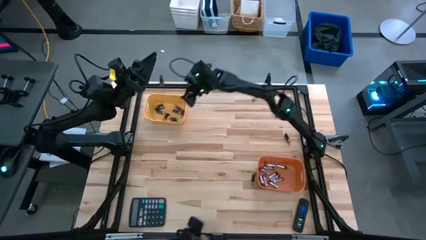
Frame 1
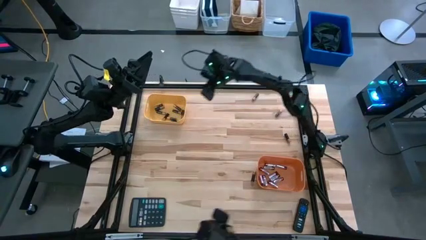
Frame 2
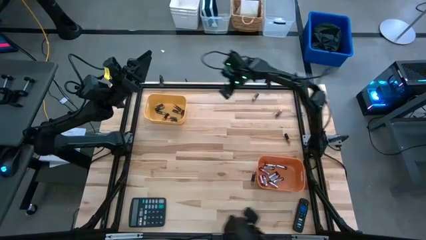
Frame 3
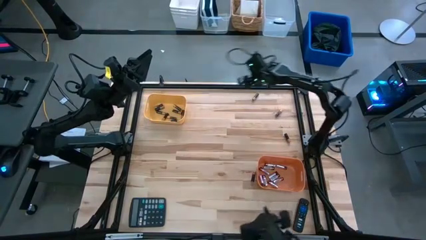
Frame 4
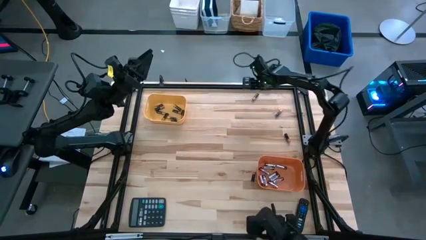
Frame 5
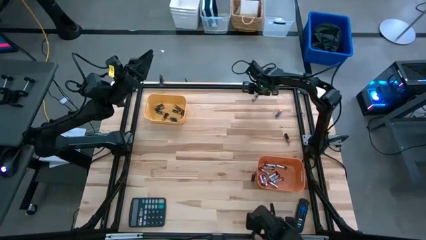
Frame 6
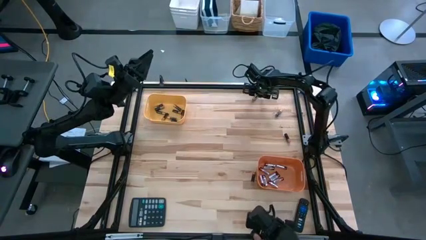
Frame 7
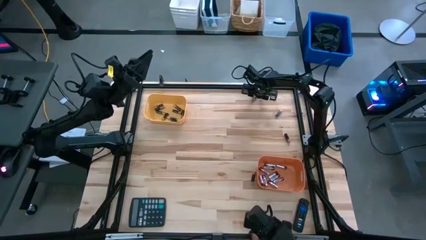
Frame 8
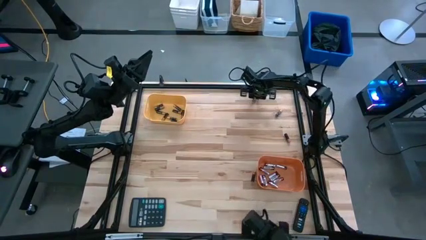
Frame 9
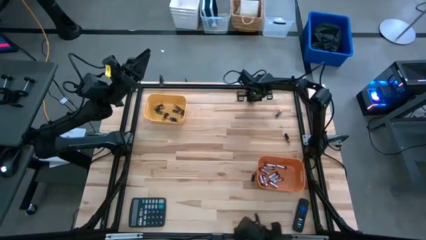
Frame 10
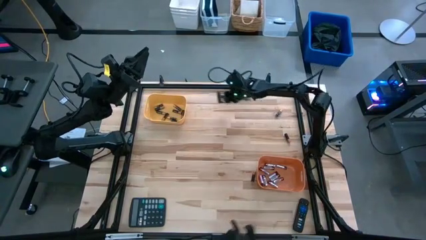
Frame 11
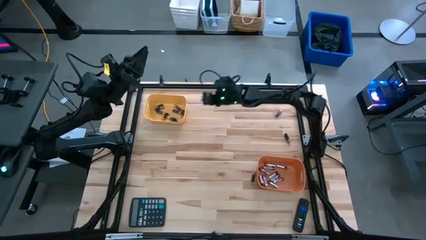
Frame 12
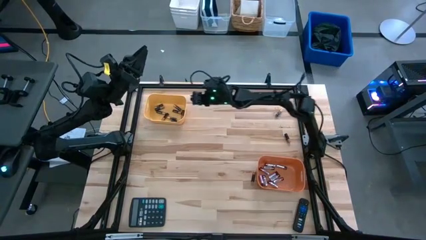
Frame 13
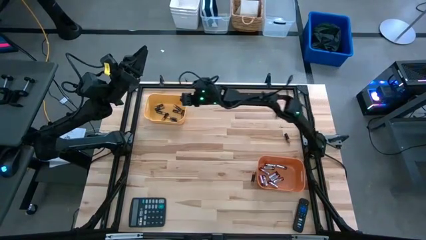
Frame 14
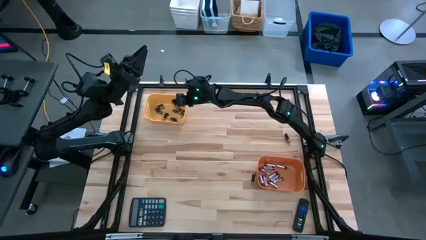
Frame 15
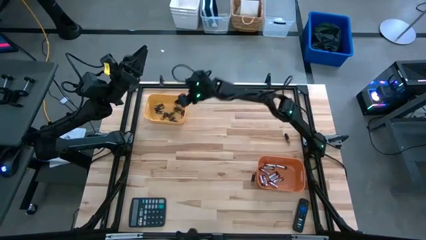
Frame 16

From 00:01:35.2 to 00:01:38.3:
Task: Sort batteries
Put the black battery into the yellow bin

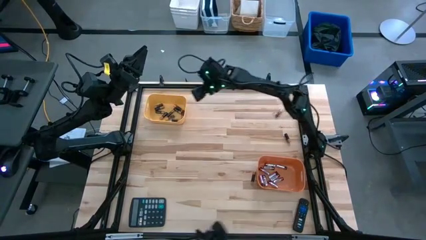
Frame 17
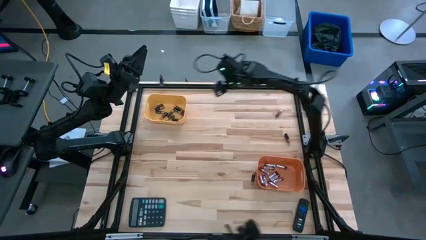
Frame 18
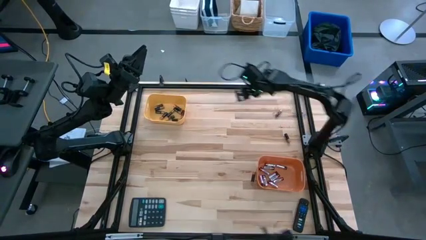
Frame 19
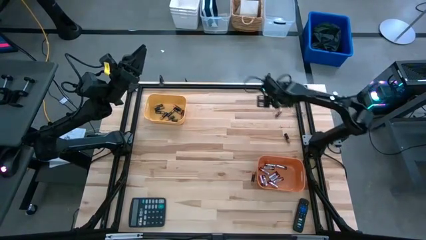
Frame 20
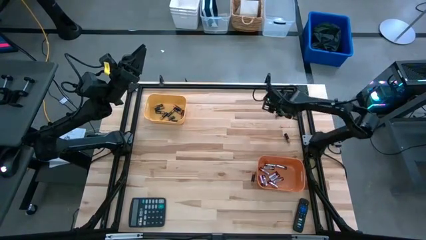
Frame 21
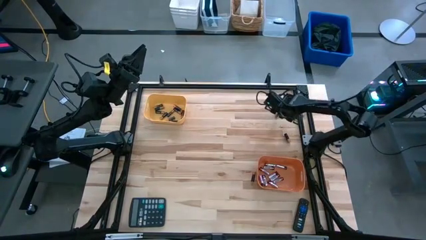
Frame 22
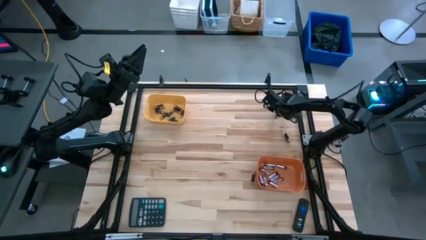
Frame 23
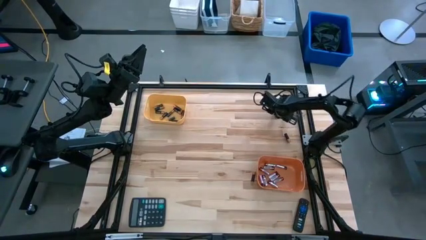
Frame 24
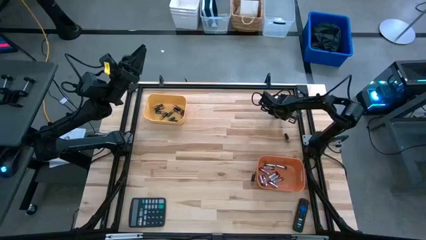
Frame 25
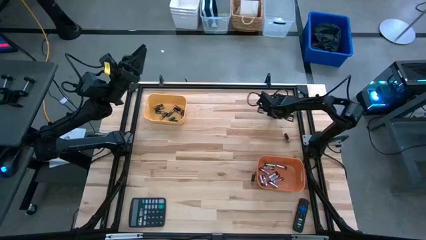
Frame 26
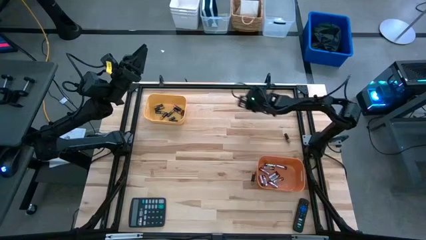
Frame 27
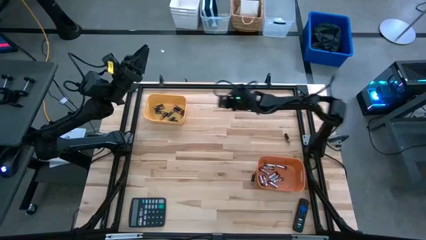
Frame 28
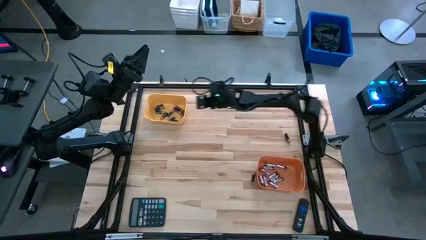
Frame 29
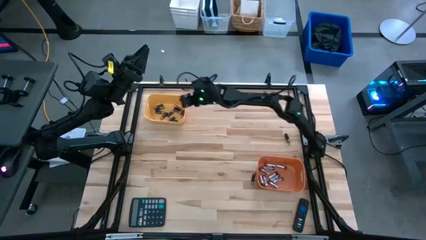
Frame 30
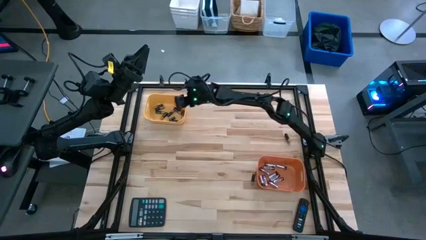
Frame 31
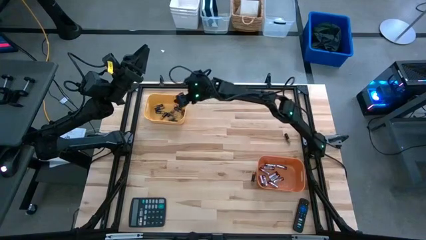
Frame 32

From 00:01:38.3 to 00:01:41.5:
Put the black battery into the yellow bin

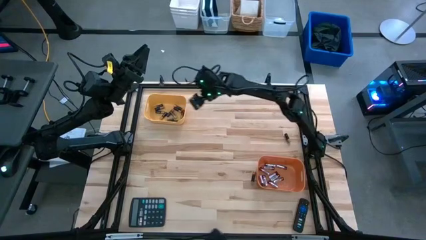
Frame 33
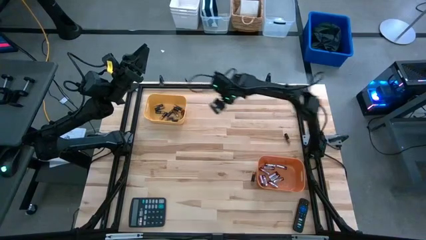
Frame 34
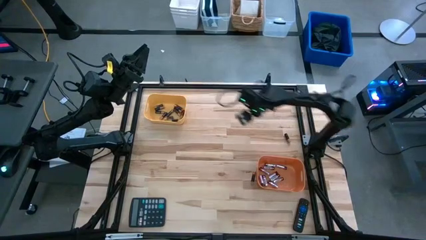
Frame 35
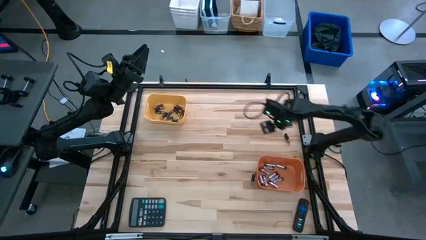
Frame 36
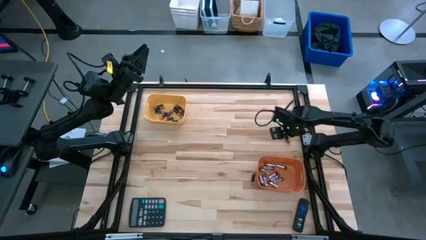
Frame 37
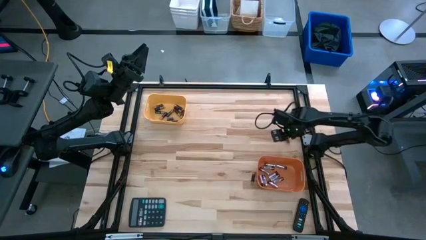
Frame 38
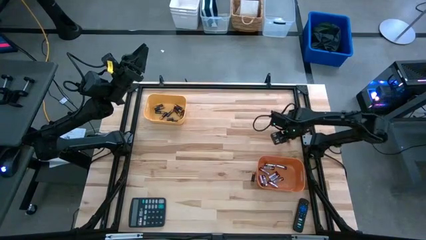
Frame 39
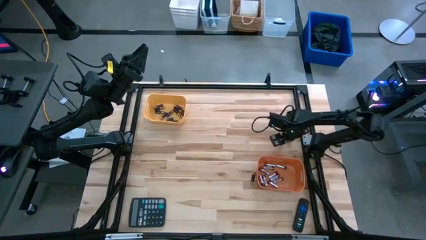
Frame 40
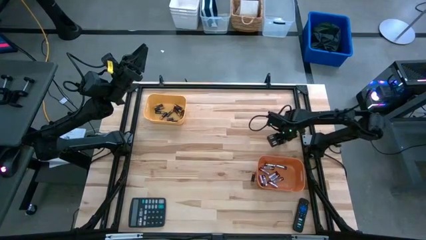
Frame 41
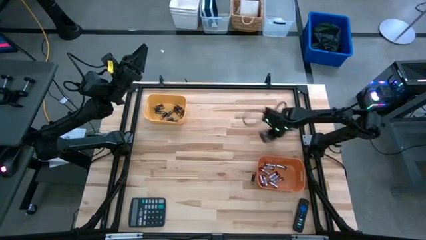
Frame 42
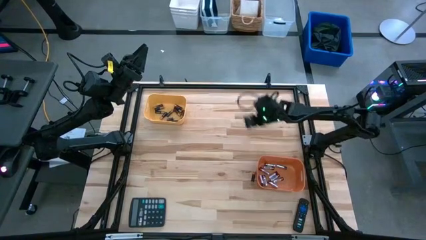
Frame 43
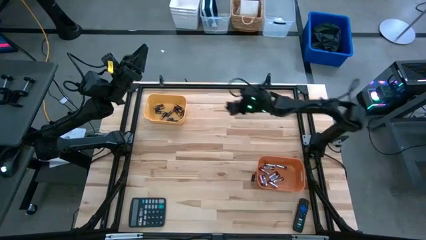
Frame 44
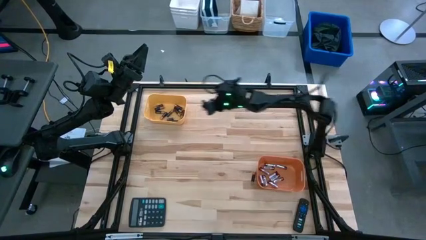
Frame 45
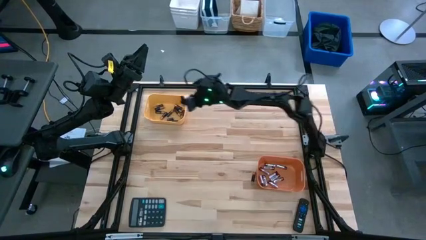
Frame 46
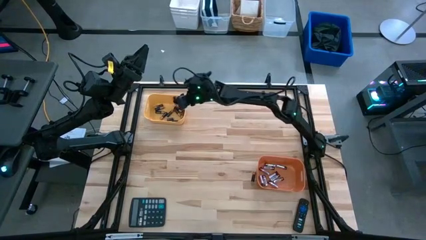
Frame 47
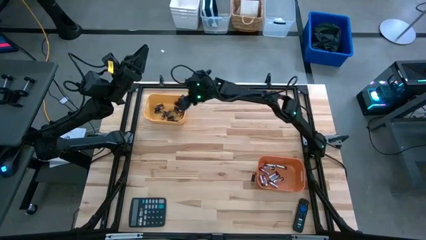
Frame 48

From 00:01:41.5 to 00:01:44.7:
Put the black battery into the yellow bin

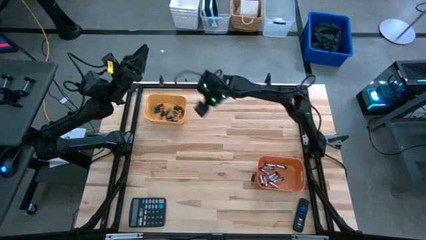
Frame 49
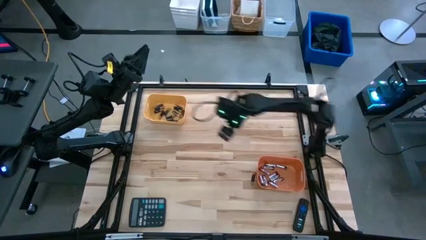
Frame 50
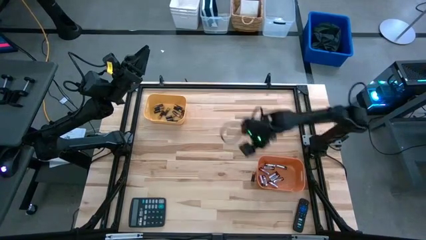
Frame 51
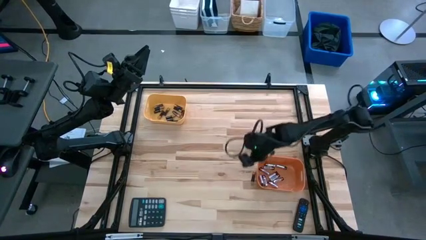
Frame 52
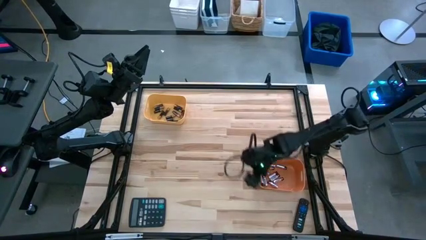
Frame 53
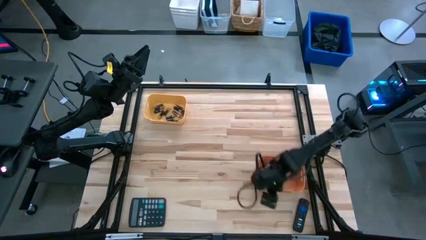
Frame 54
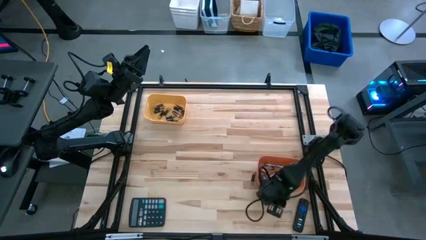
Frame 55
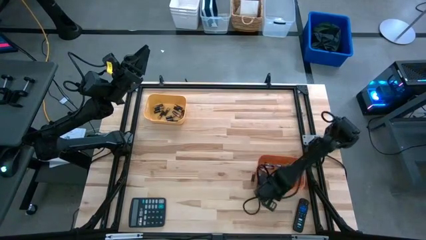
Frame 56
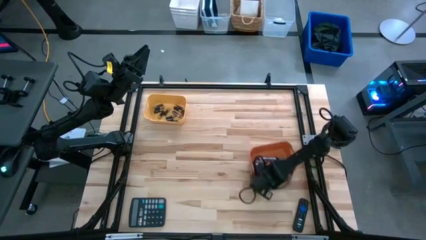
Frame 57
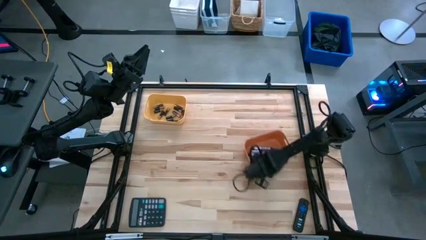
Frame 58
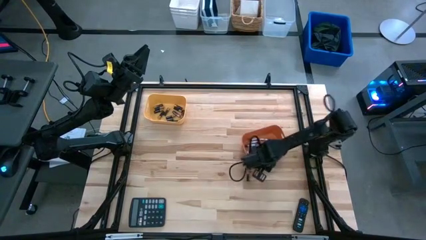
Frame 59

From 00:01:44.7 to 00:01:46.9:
Adjust the orange bin

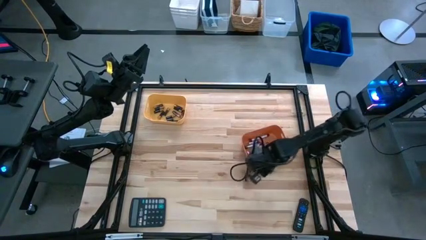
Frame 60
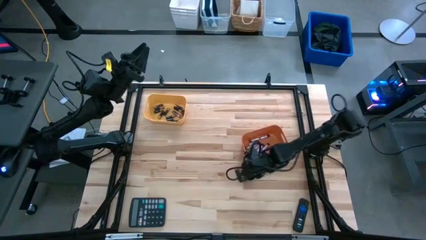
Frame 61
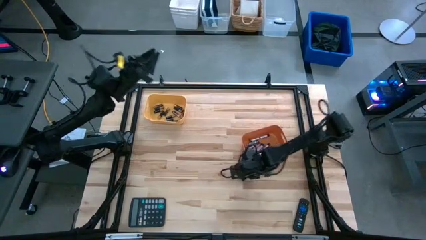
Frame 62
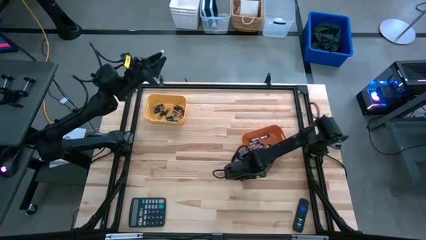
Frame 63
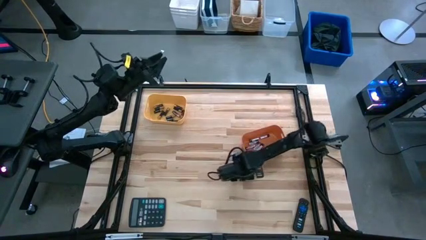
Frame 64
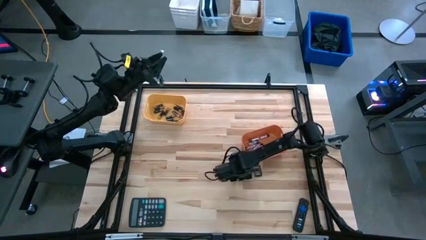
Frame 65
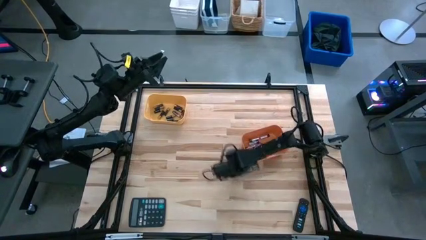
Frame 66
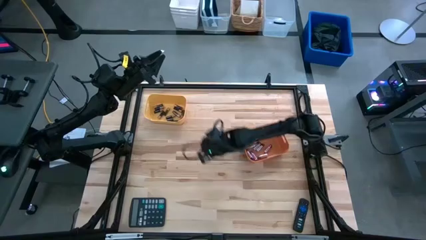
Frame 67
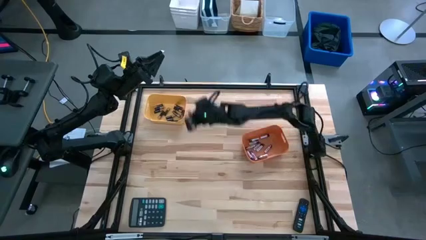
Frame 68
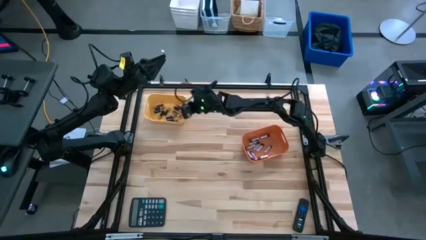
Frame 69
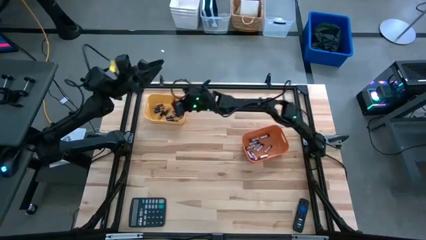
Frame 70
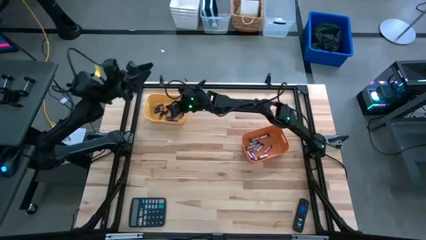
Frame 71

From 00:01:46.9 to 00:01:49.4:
Put the black battery into the yellow bin

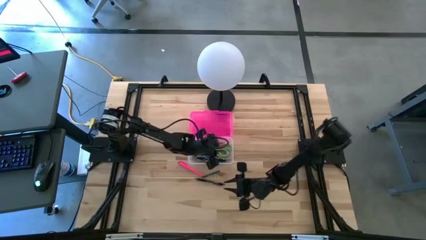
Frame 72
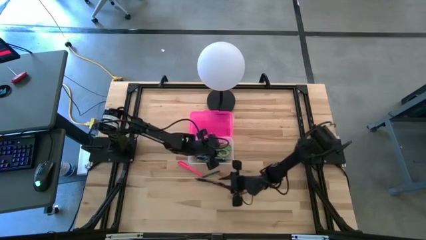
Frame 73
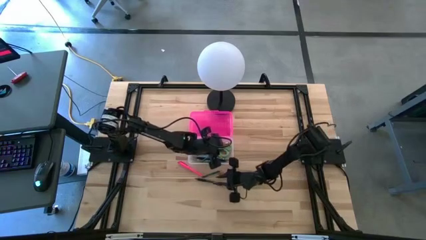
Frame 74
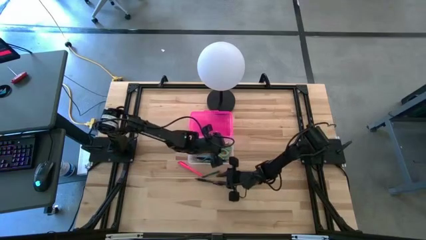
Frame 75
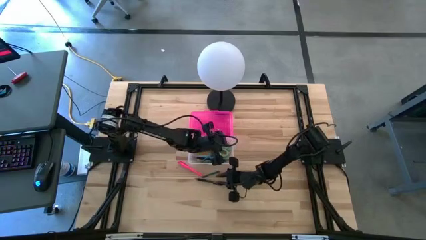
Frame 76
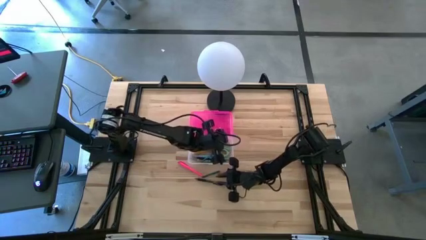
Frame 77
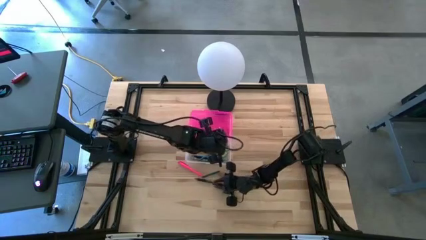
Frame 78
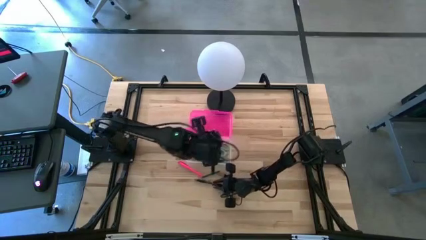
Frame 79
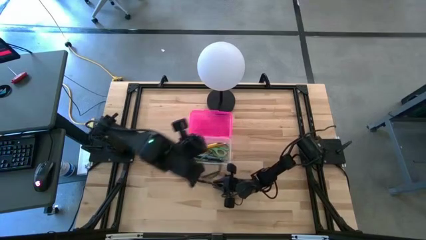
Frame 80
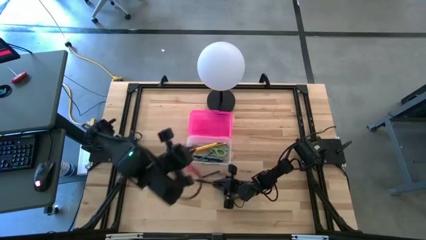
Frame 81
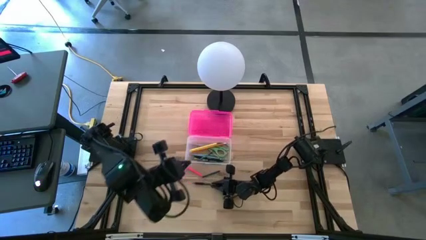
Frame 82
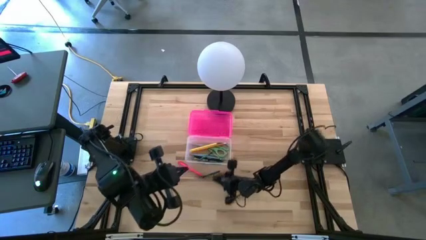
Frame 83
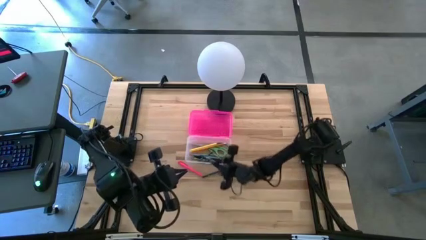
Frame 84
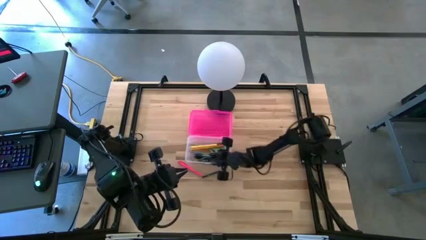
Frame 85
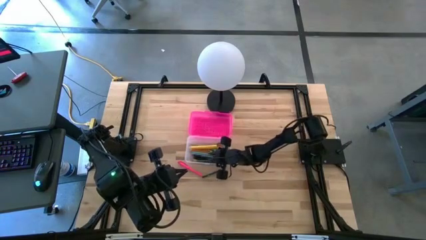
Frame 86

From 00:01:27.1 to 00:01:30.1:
Task: Pick & place school supplies into a supply box
Put the black pen into the pink supply box
